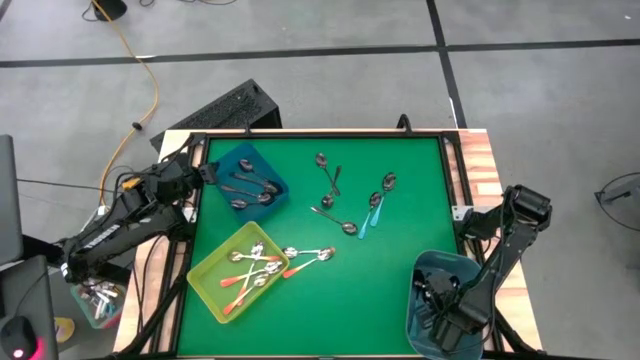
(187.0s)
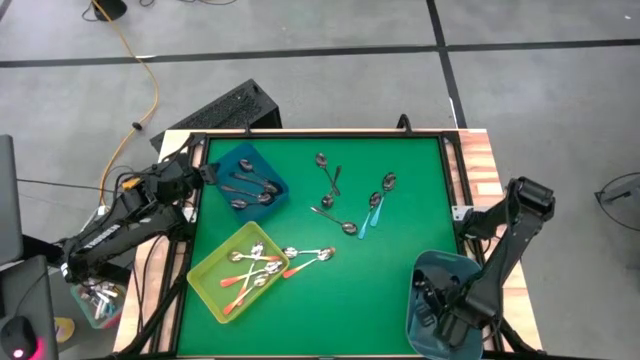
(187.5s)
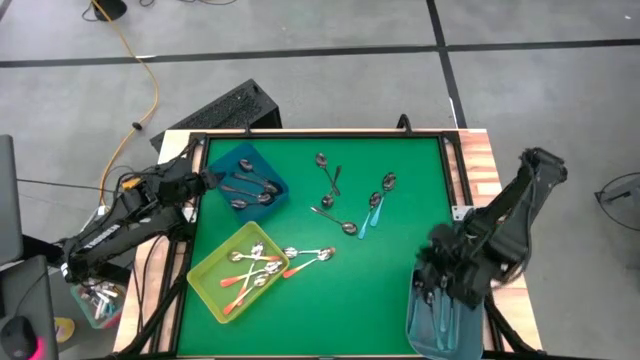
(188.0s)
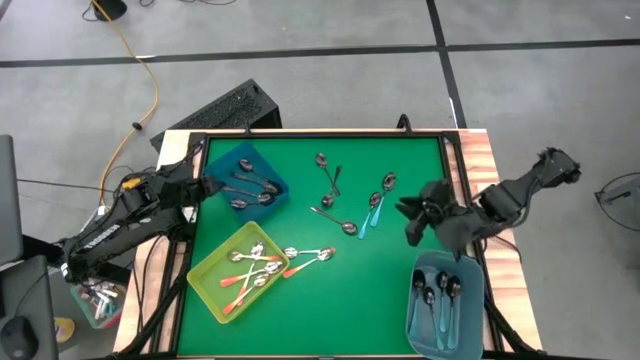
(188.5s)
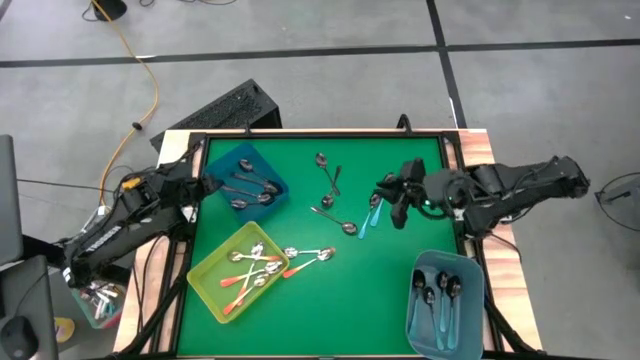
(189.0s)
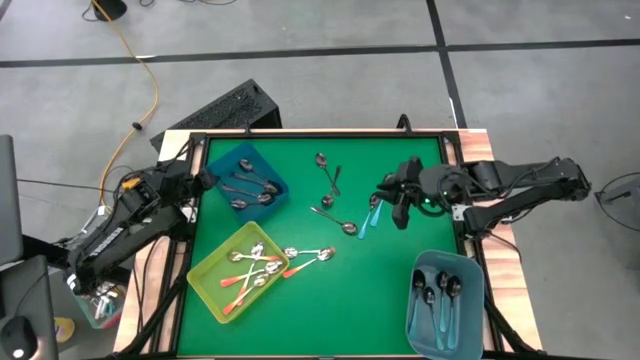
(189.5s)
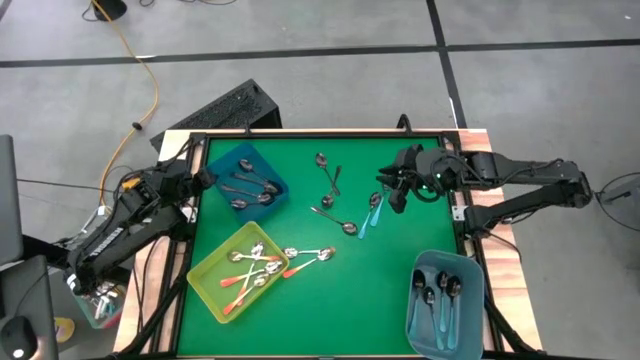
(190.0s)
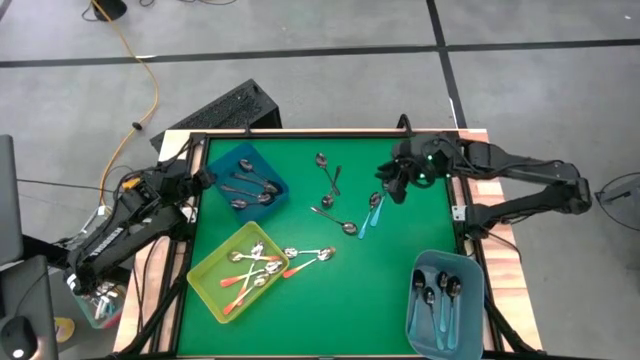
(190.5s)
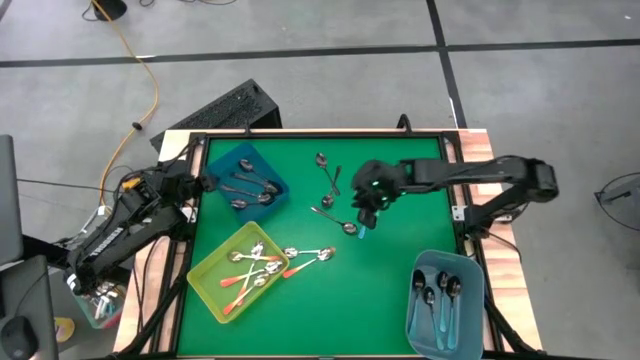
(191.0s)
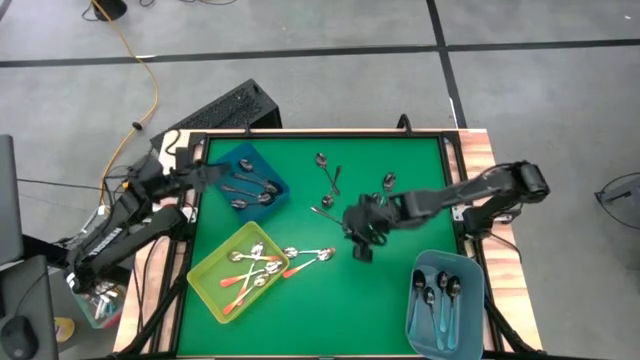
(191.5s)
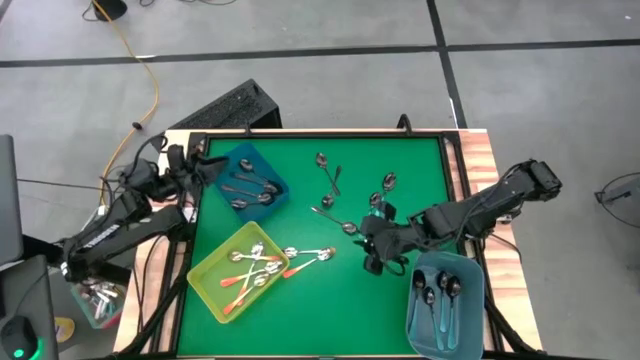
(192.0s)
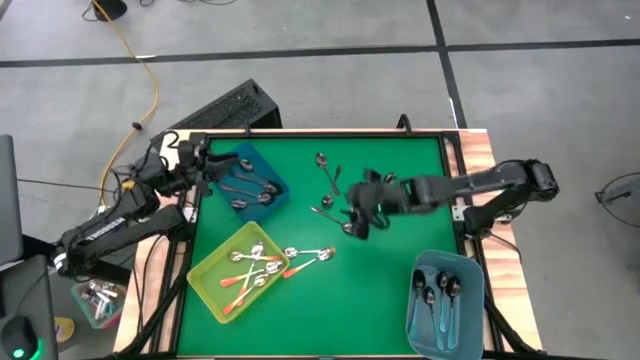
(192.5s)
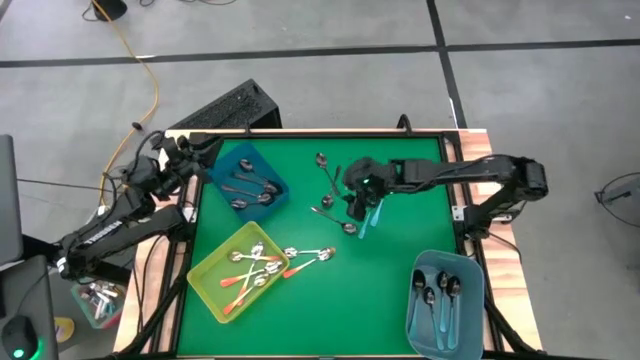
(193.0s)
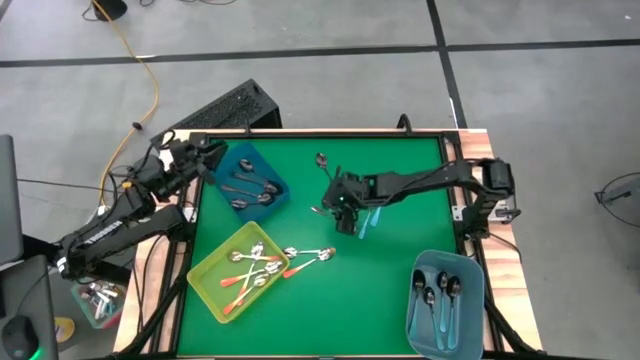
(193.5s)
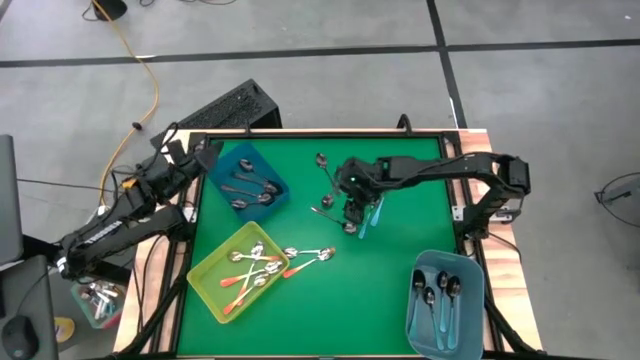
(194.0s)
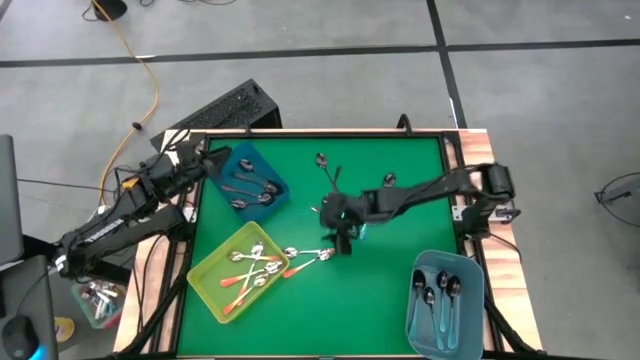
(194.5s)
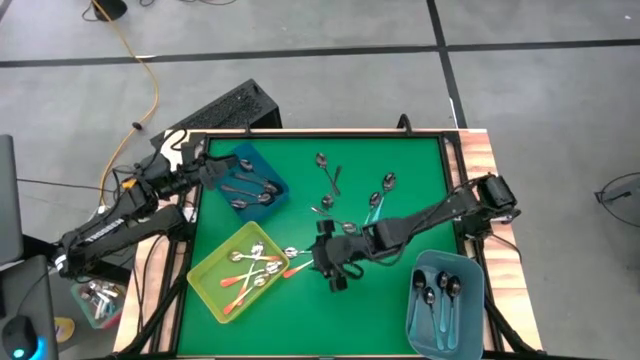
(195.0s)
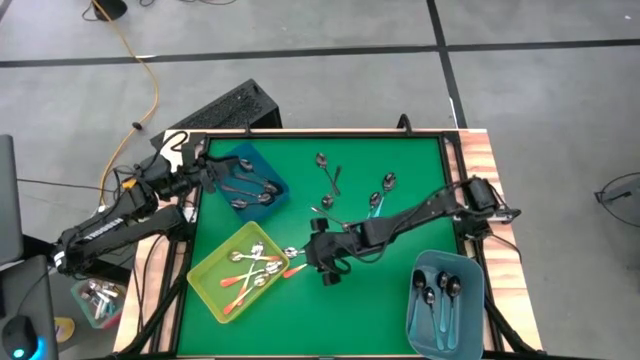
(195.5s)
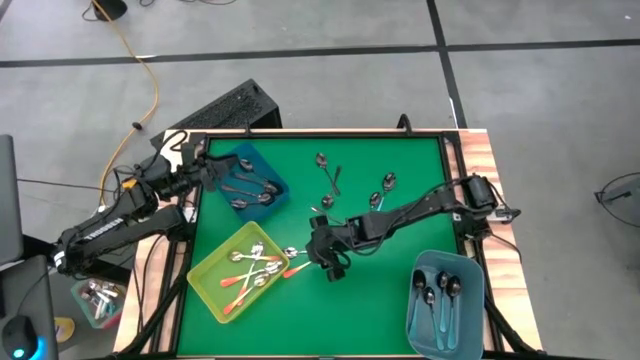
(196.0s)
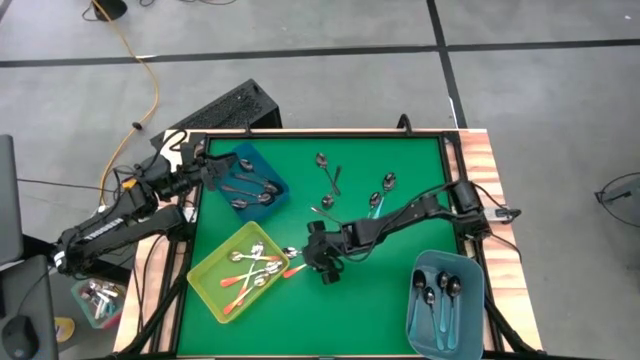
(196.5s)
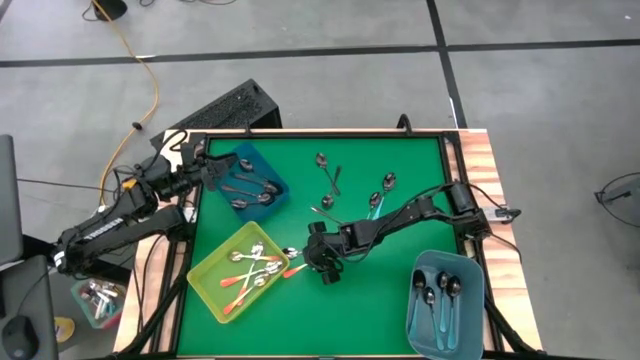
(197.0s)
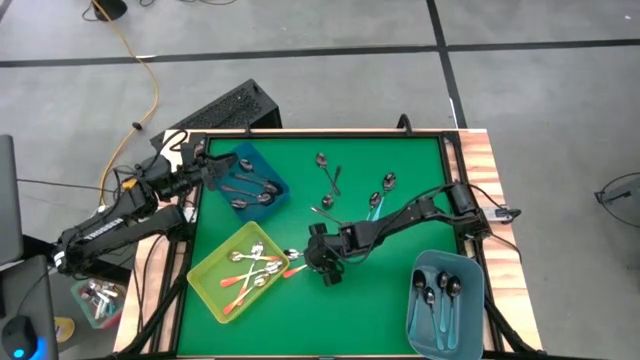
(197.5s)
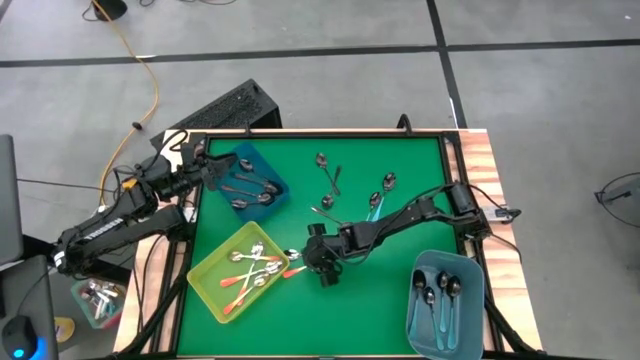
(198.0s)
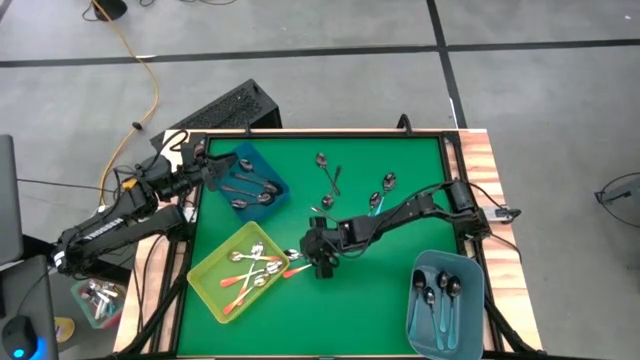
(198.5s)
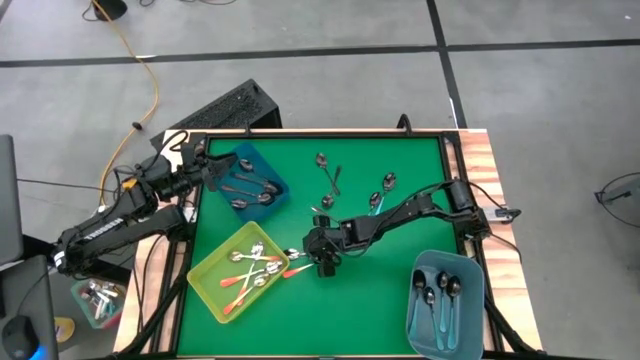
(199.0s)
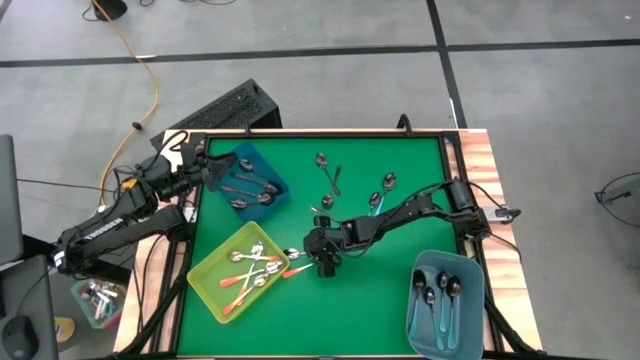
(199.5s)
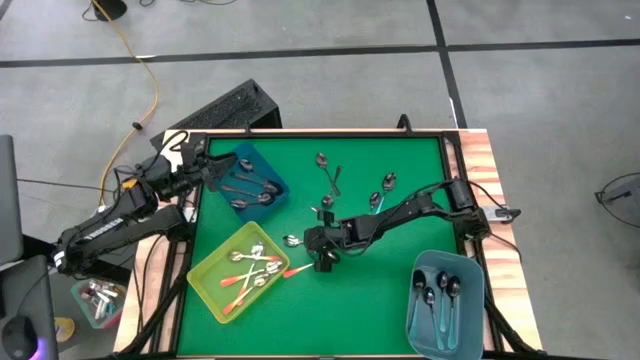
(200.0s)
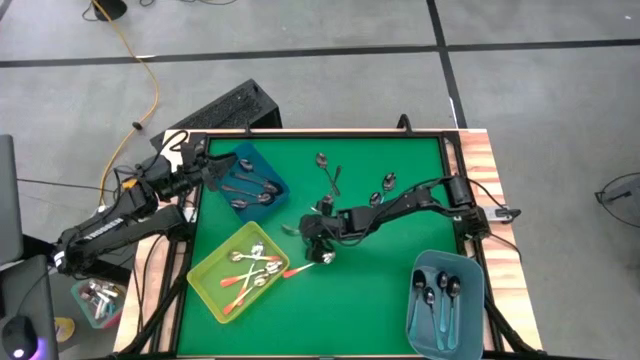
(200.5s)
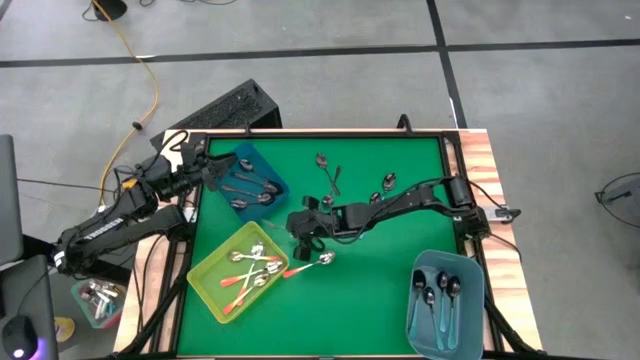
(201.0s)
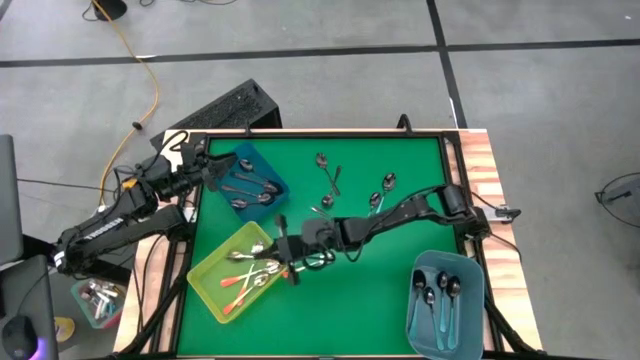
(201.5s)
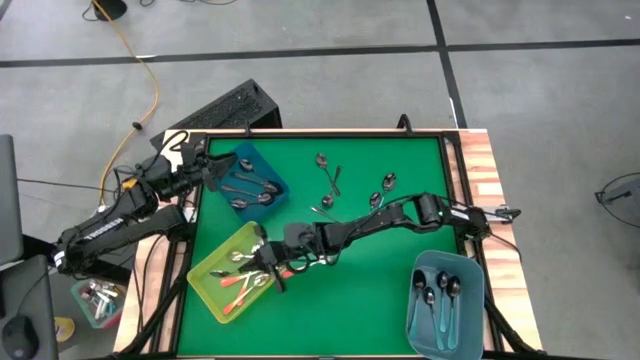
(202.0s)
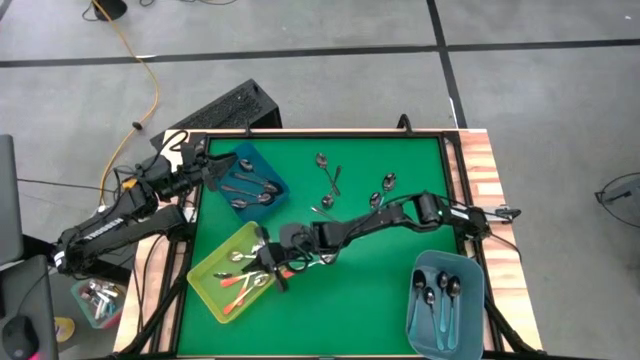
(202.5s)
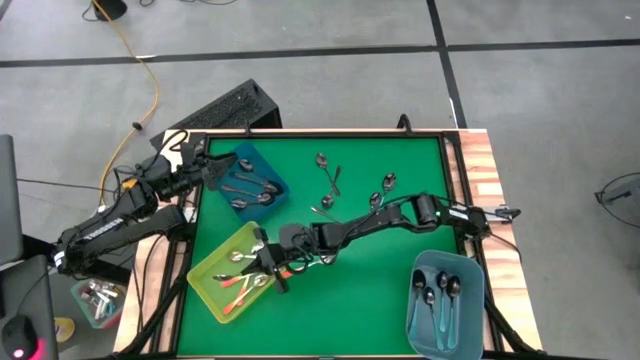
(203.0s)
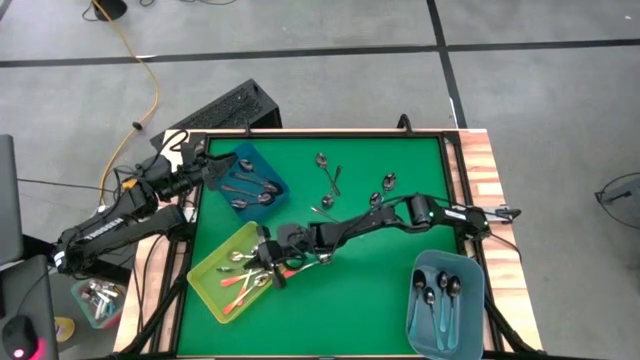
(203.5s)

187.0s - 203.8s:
Task: Sort silverware by color (type)
Put the orange spoon into the green bin

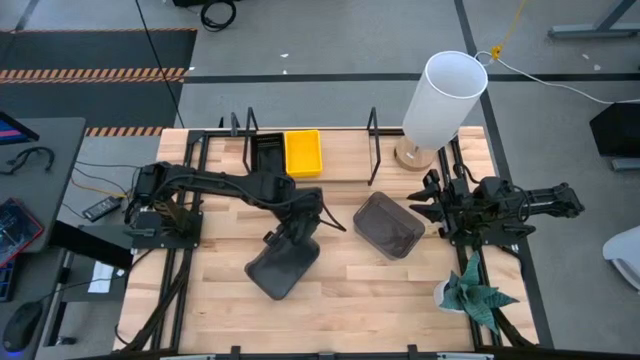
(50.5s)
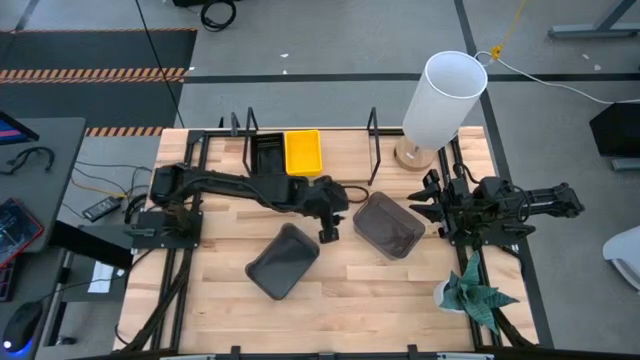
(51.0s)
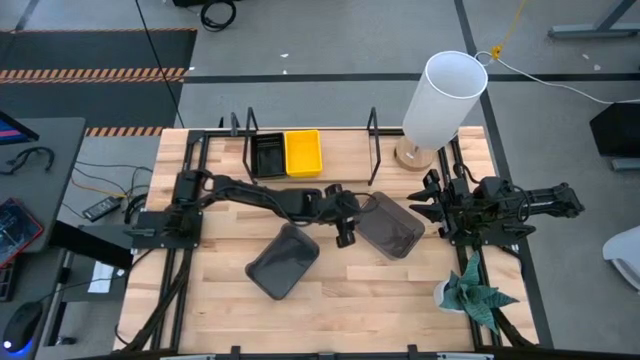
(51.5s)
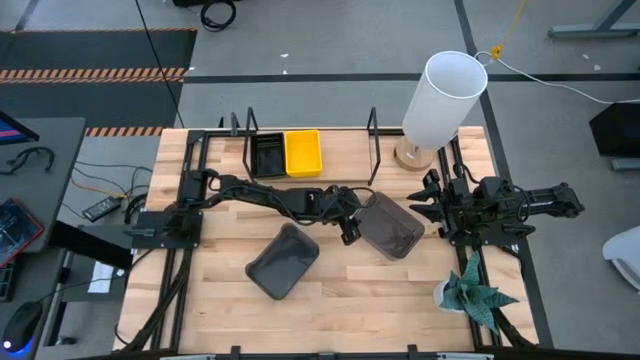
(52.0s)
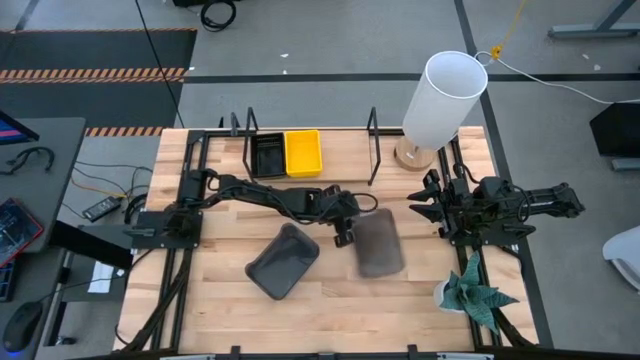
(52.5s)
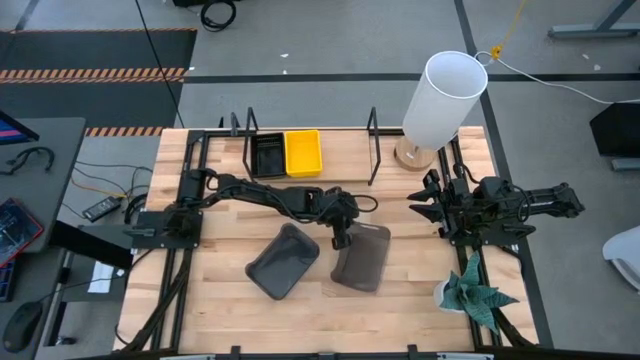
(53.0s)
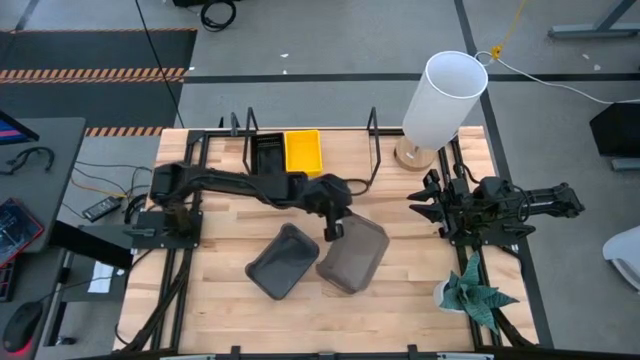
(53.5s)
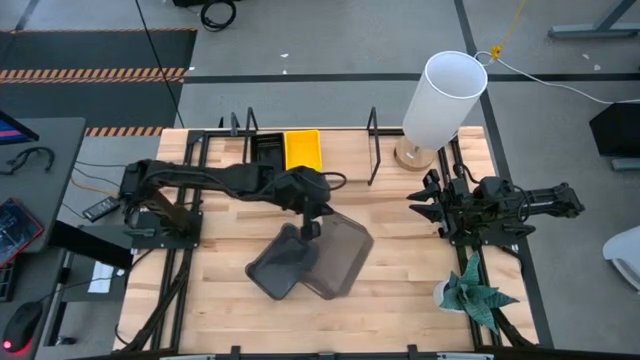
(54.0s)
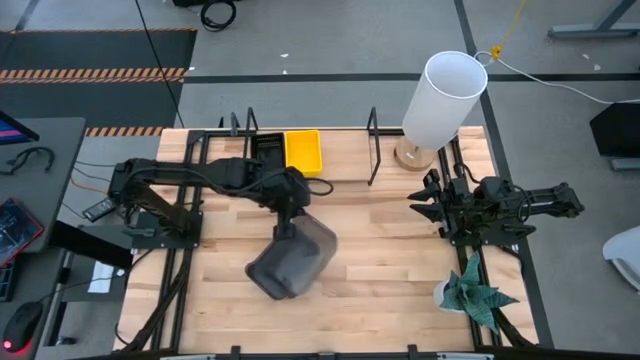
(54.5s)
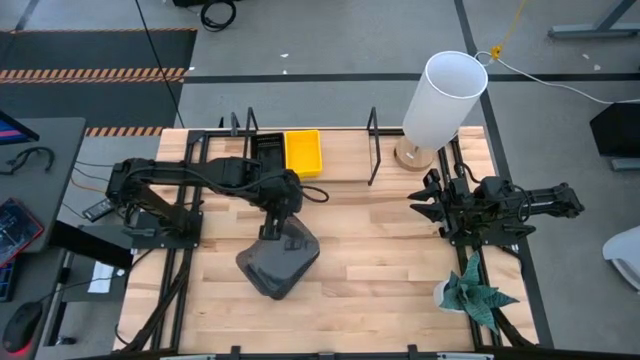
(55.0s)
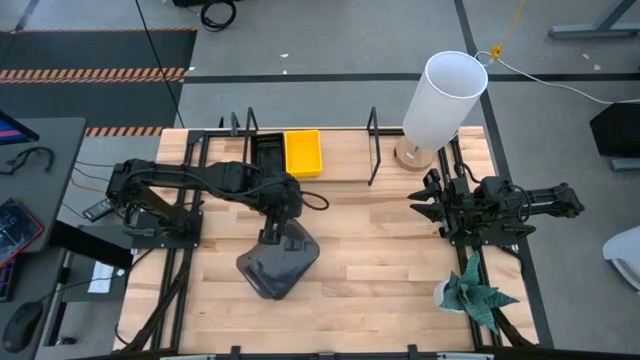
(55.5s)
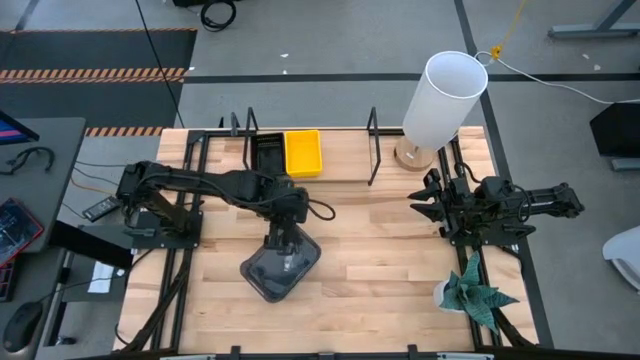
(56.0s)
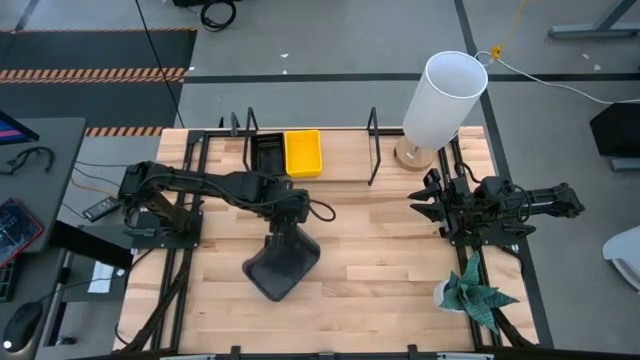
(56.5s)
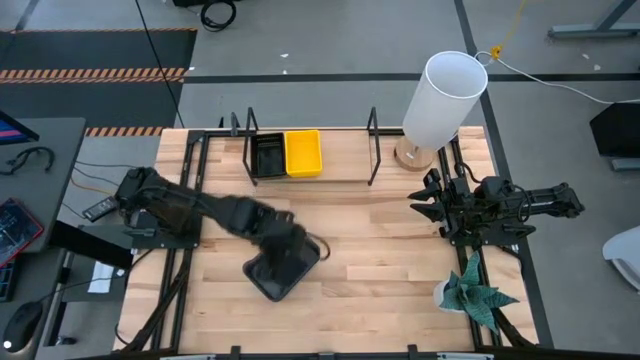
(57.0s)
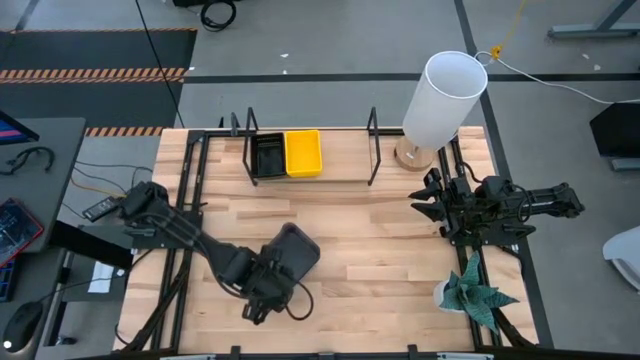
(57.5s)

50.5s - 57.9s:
Task: Stack baskets on shelf by color
Stack the right black bin on top of the left black bin
